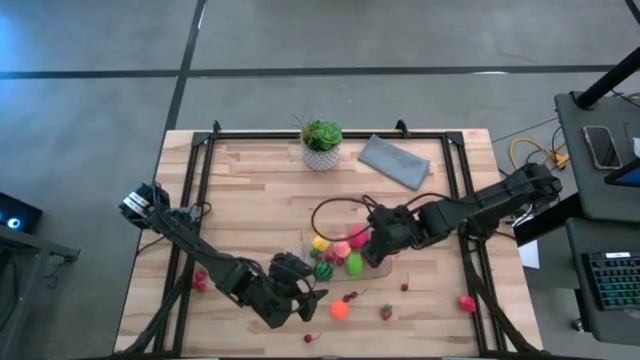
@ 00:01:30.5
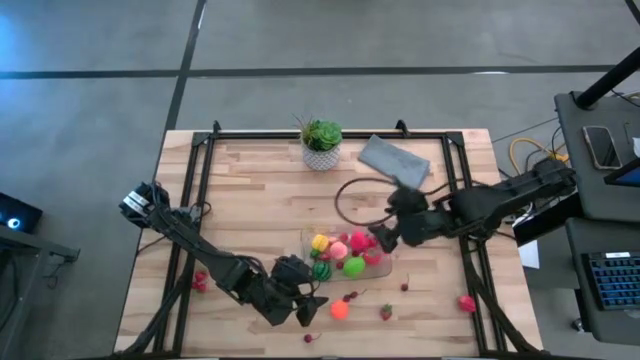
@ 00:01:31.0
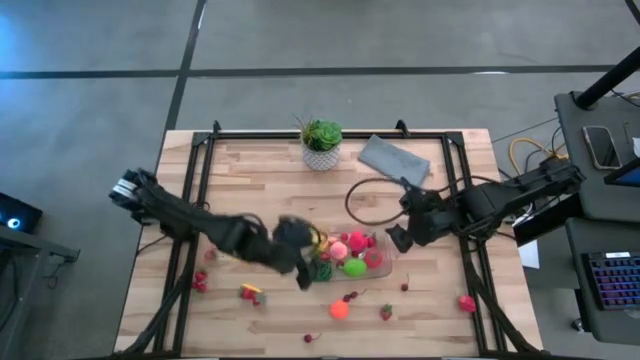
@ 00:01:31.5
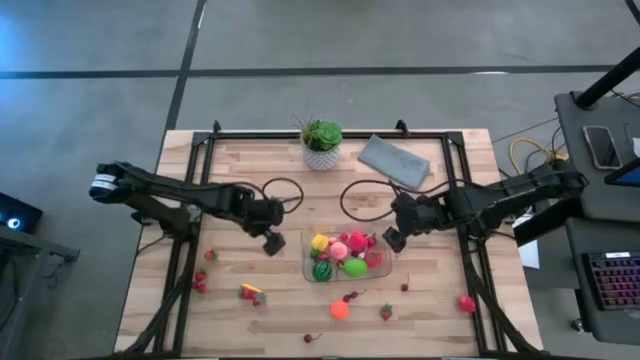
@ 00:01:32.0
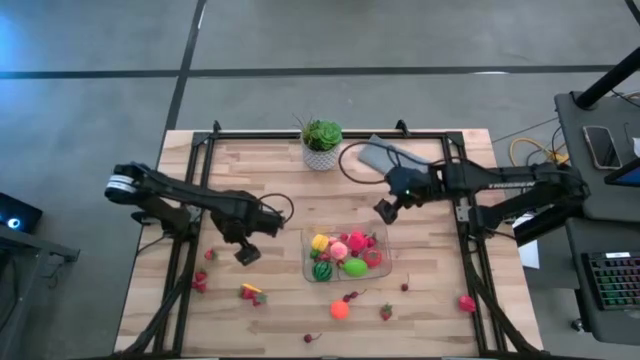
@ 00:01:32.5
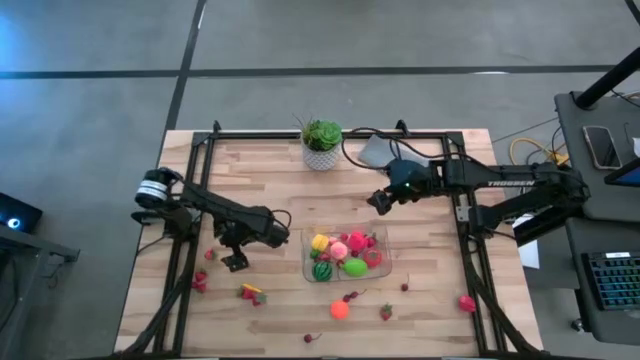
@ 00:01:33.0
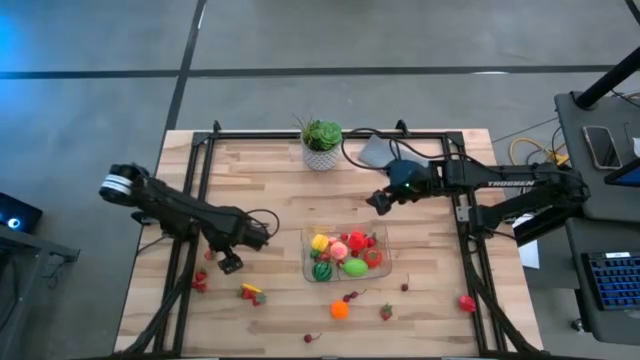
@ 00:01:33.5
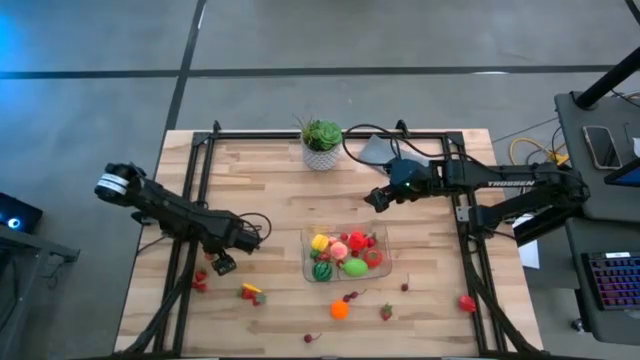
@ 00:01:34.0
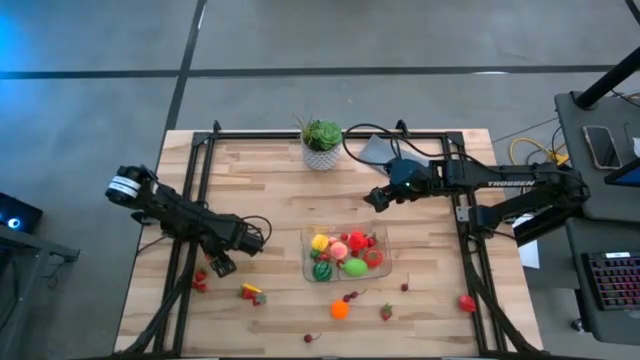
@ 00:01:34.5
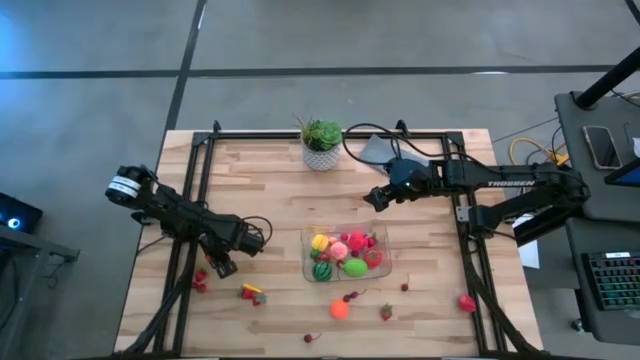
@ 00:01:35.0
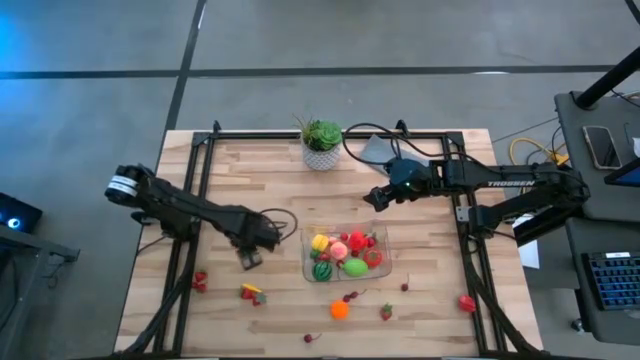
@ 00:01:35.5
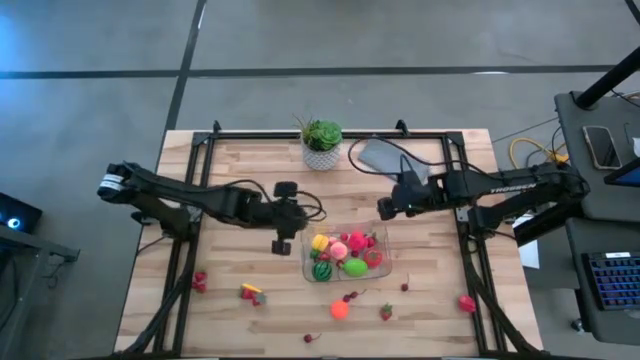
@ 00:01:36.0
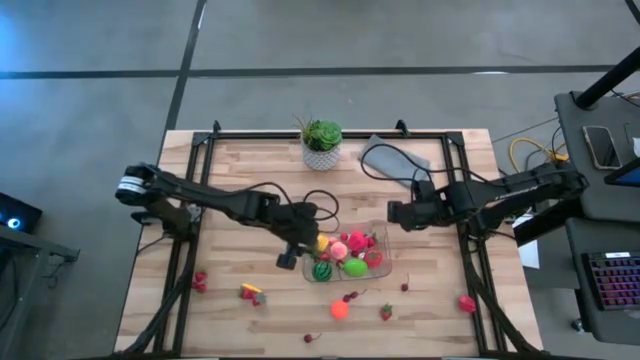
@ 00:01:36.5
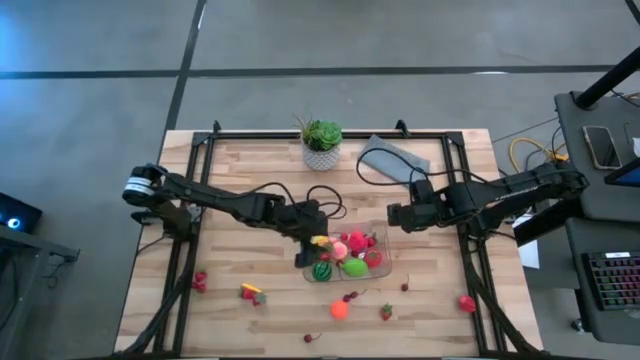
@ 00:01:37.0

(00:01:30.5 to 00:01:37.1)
Task: Pick and placing Produce into tupperware
Put the strawberry into the transparent bin

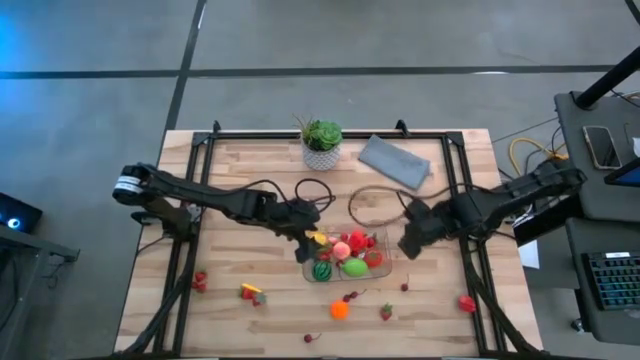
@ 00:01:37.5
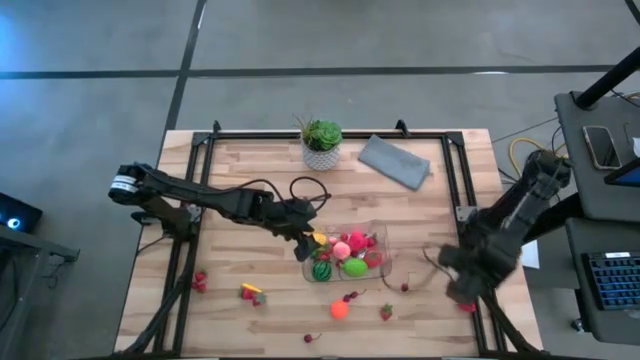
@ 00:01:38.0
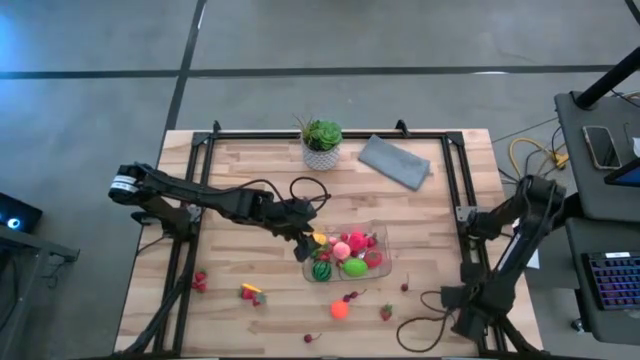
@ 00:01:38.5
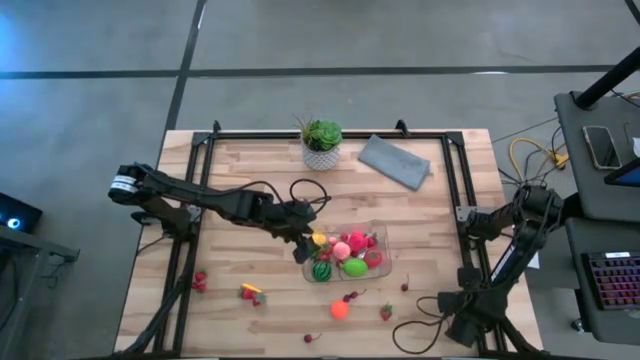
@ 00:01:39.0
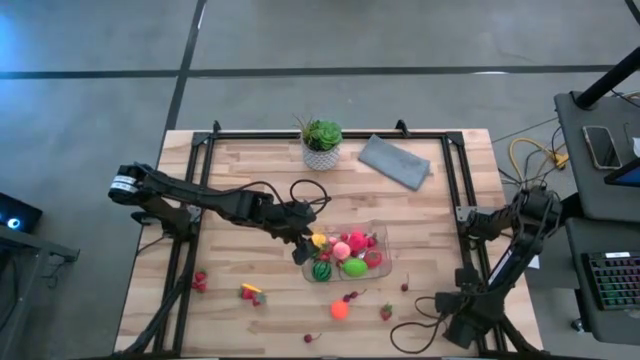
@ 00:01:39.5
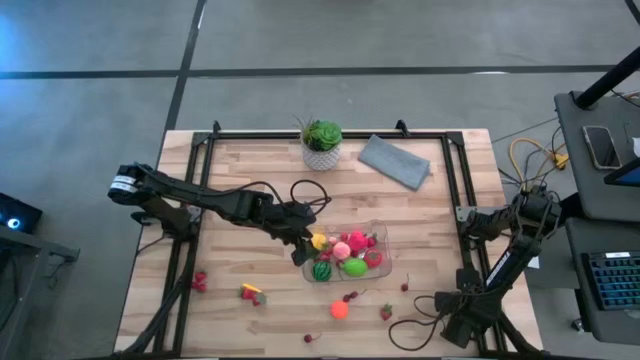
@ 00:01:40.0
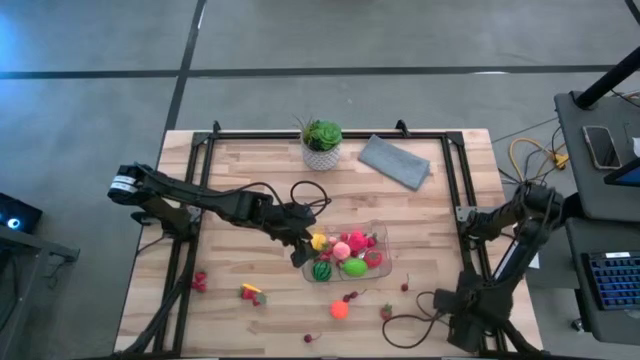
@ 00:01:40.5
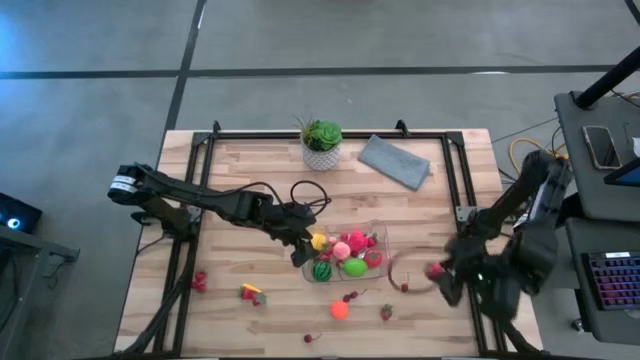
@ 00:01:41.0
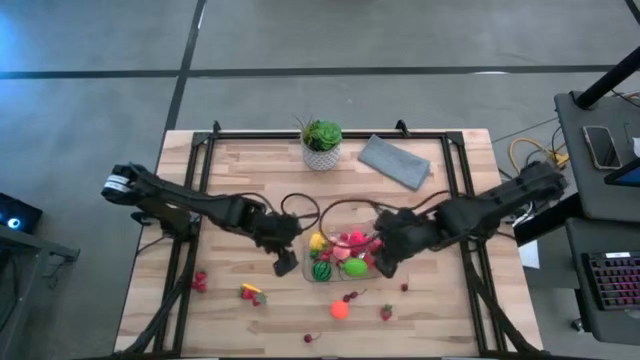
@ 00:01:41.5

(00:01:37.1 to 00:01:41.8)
Put the strawberry into the transparent bin

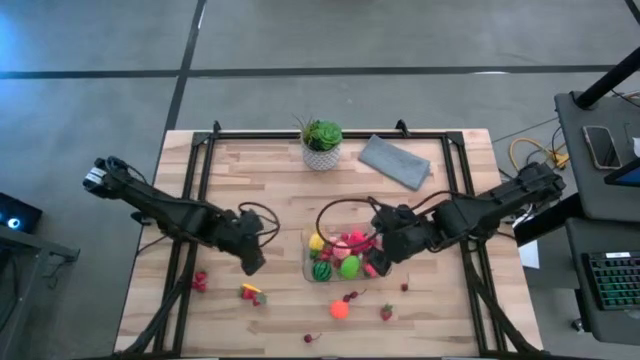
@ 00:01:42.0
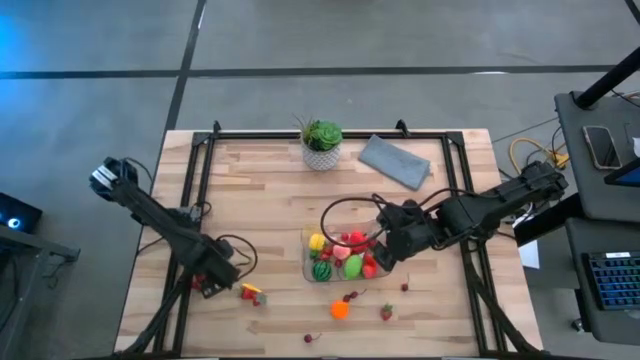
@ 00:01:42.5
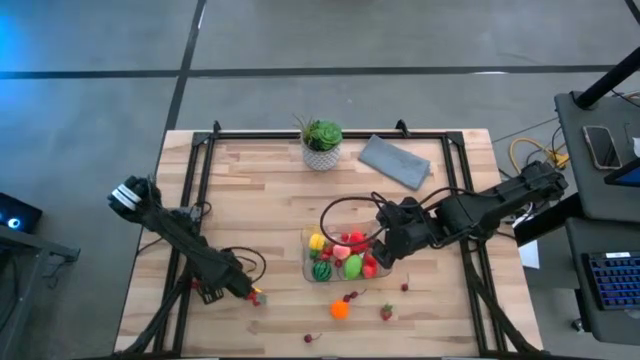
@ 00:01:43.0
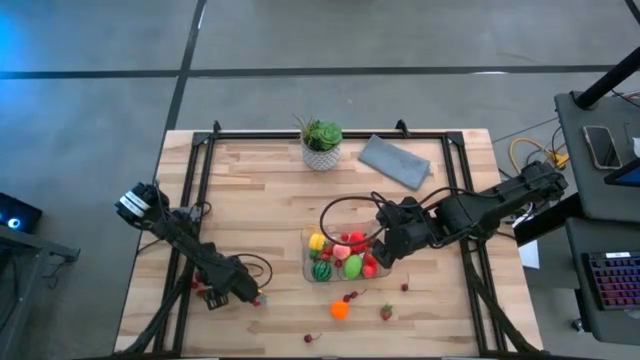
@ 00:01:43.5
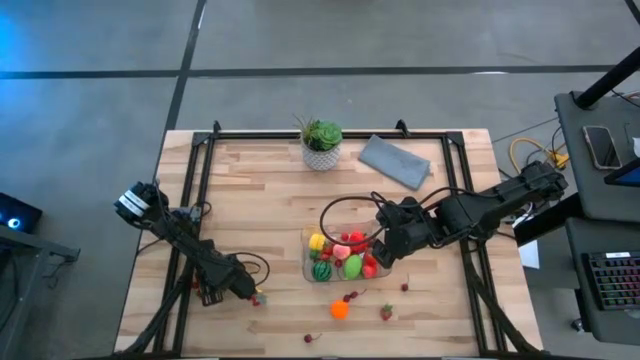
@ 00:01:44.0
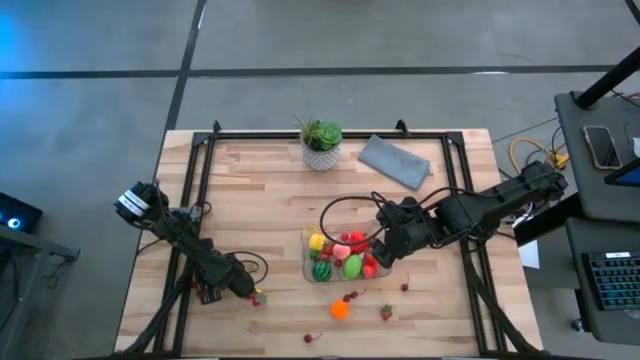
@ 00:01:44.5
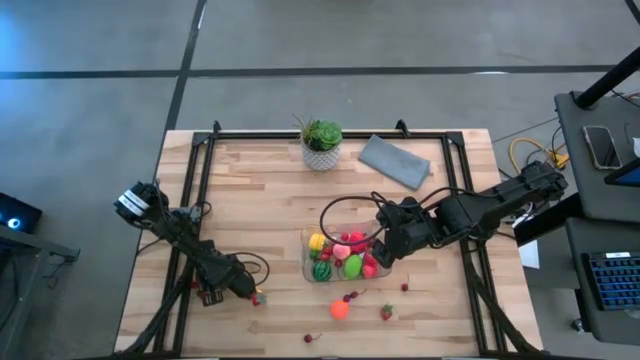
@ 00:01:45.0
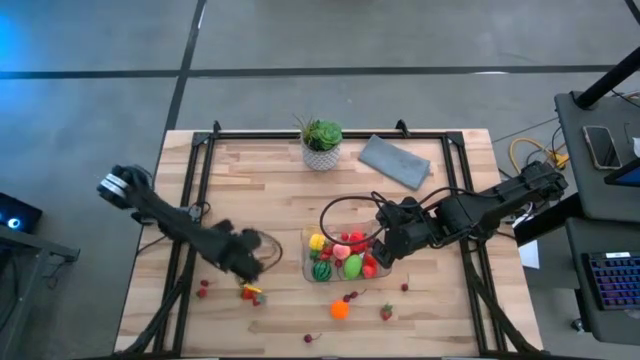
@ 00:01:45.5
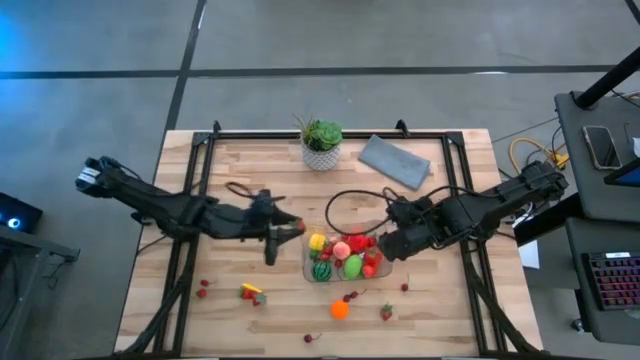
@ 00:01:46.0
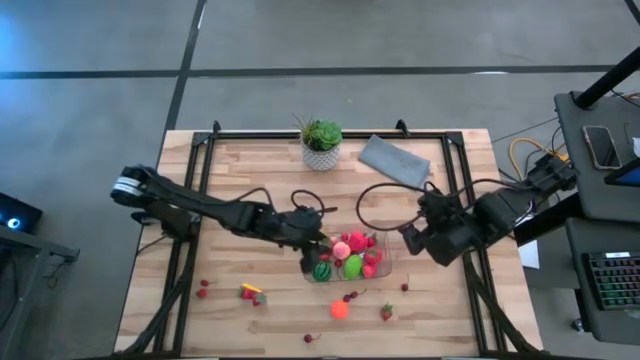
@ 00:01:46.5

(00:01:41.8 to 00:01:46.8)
Put the strawberry into the transparent bin

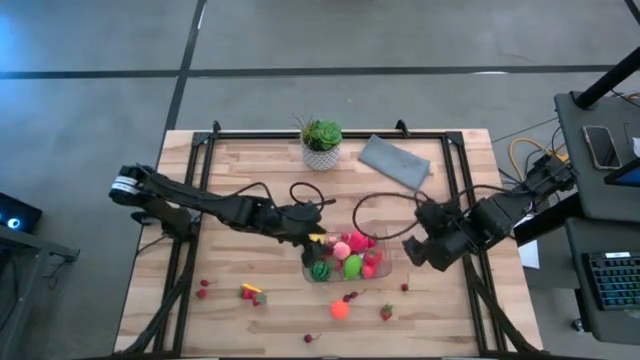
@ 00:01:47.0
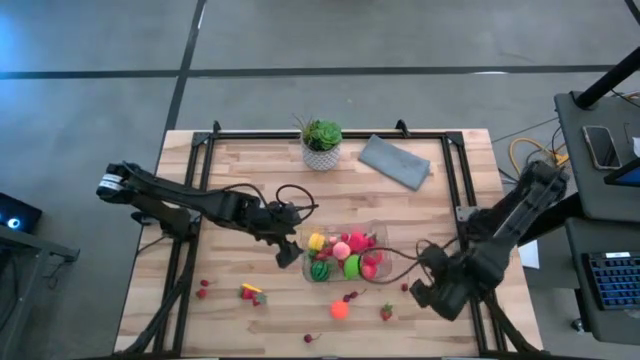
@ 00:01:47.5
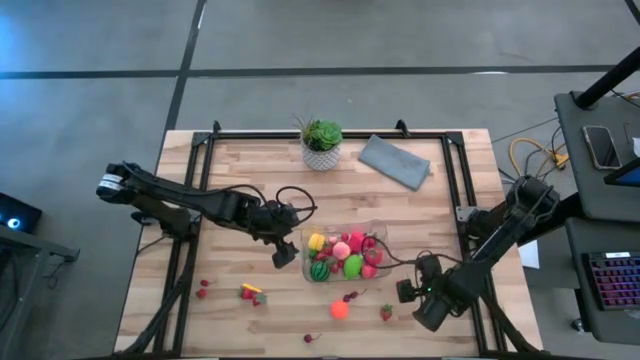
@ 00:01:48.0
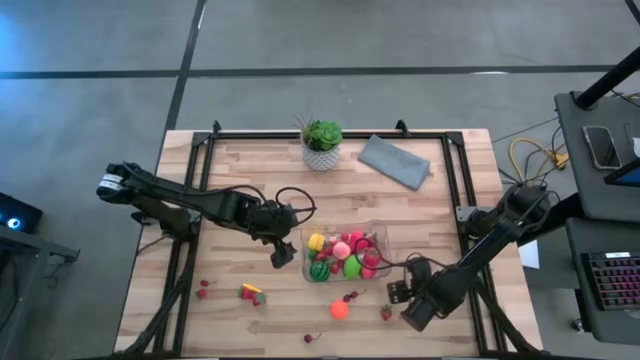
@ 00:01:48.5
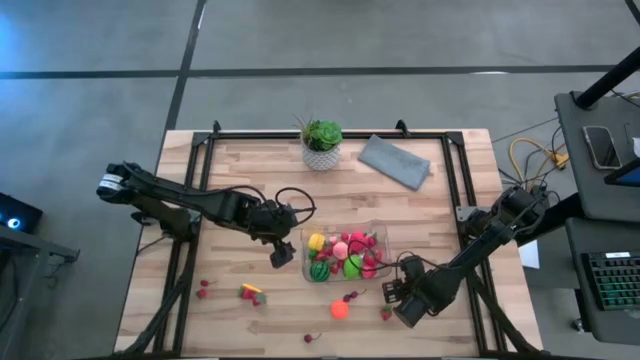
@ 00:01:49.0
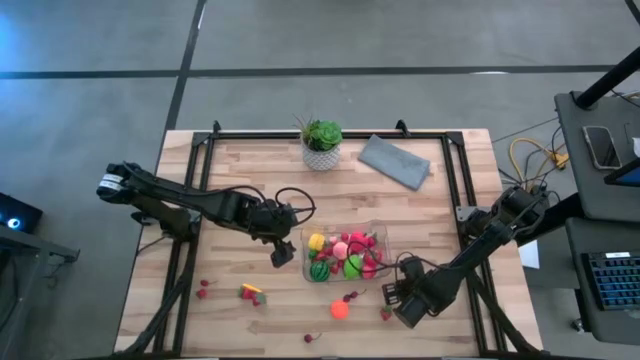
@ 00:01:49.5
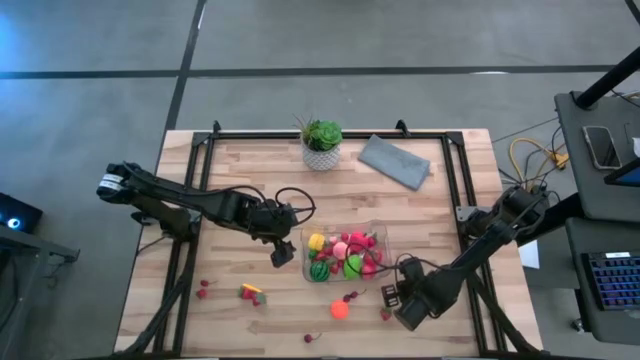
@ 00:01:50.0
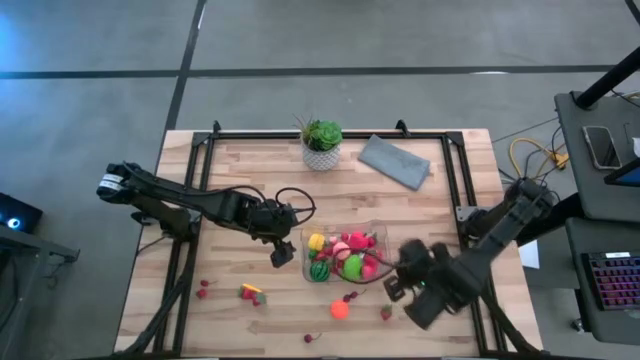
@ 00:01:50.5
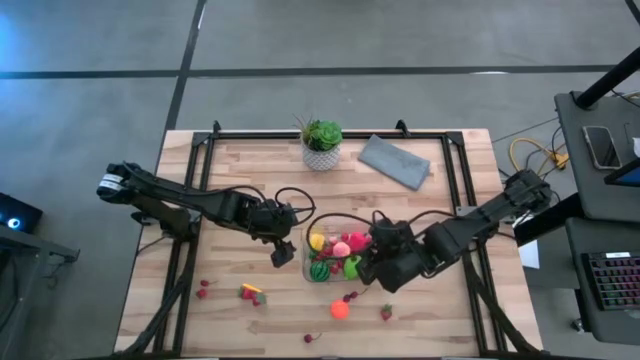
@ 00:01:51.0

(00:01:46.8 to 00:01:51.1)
Put the cherry into the transparent bin
